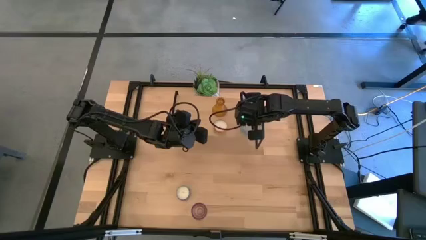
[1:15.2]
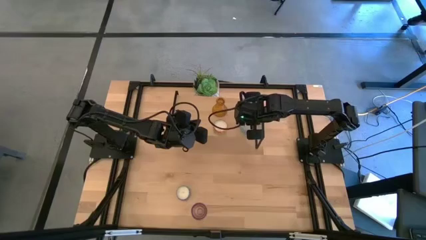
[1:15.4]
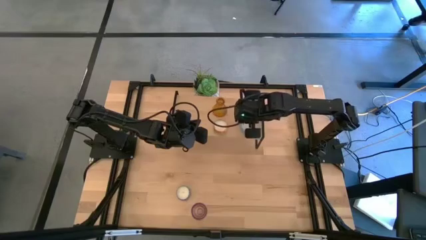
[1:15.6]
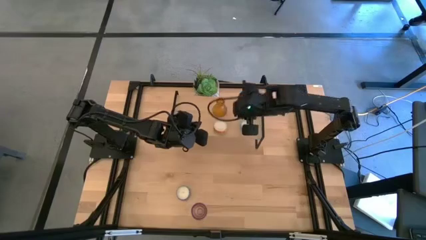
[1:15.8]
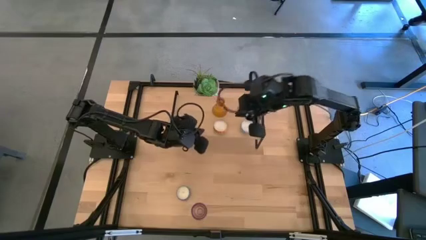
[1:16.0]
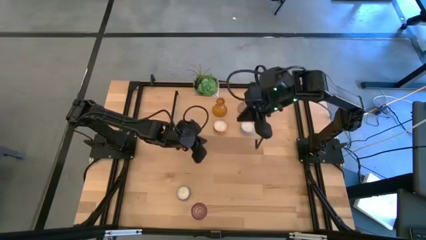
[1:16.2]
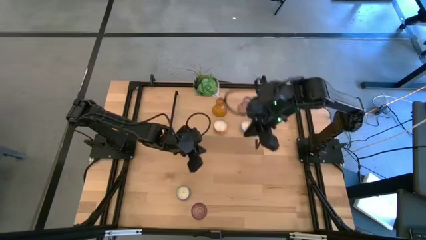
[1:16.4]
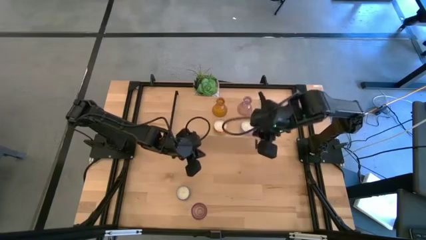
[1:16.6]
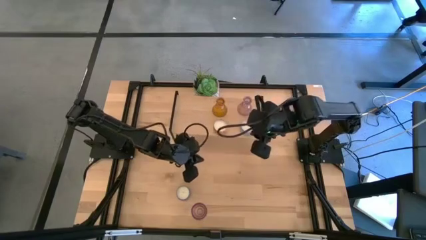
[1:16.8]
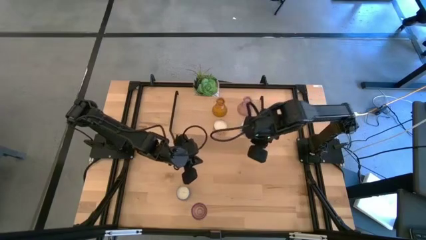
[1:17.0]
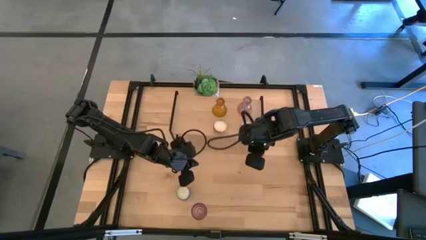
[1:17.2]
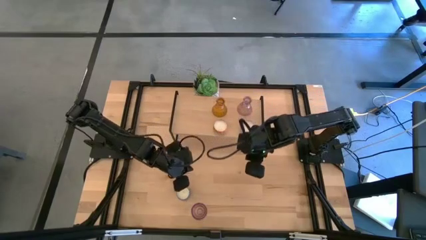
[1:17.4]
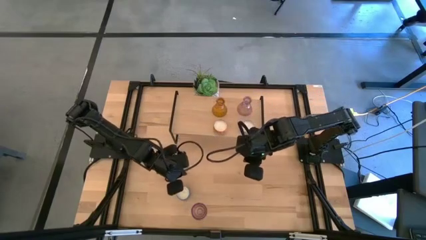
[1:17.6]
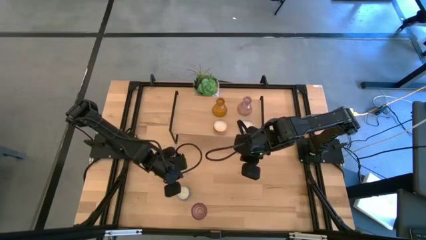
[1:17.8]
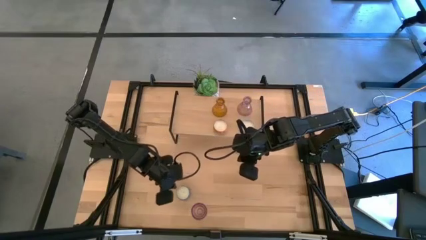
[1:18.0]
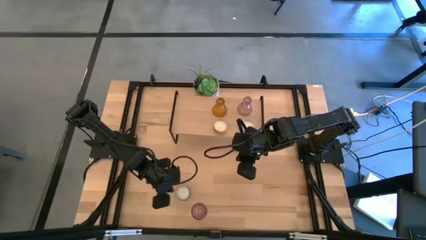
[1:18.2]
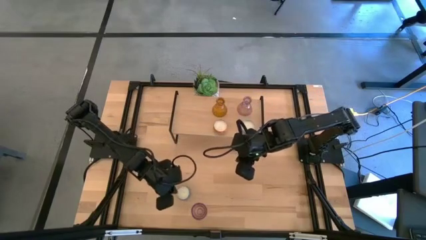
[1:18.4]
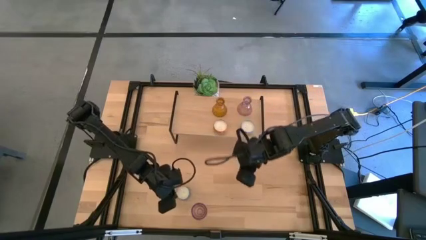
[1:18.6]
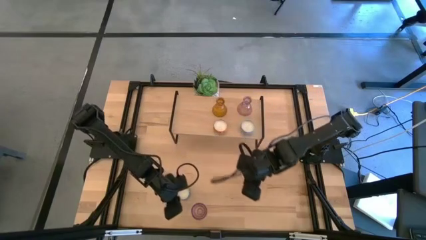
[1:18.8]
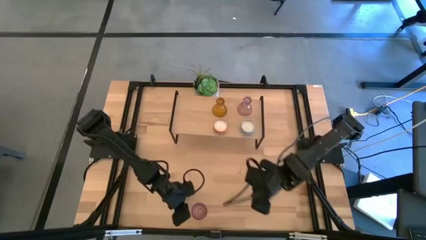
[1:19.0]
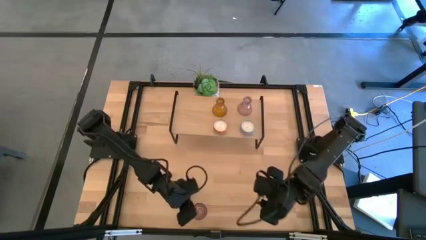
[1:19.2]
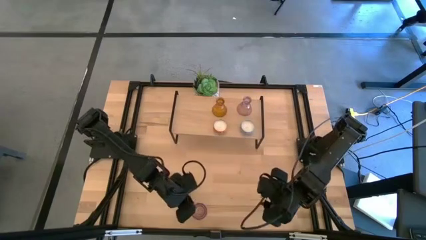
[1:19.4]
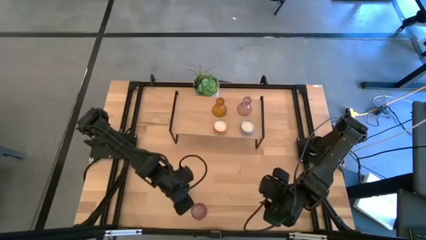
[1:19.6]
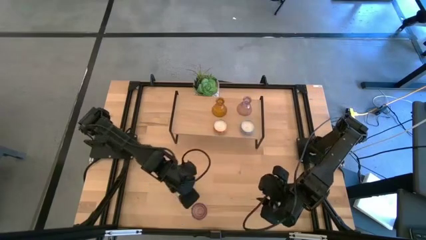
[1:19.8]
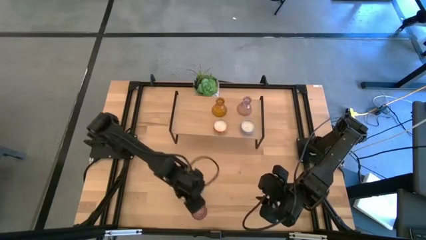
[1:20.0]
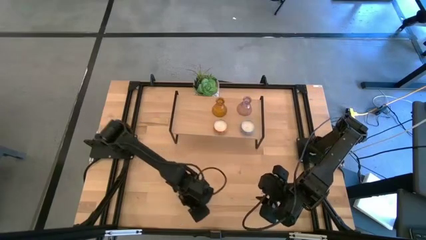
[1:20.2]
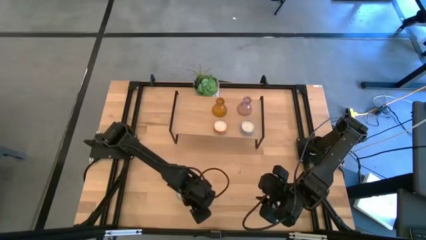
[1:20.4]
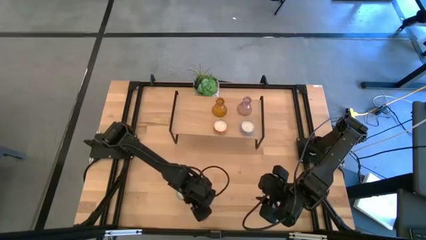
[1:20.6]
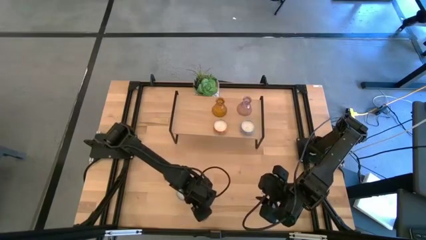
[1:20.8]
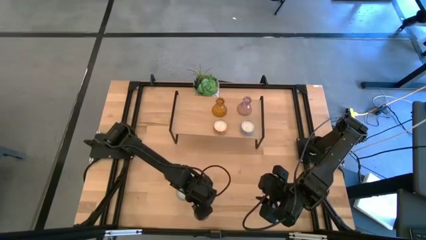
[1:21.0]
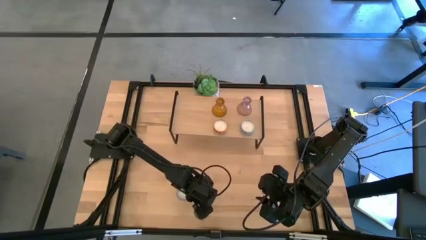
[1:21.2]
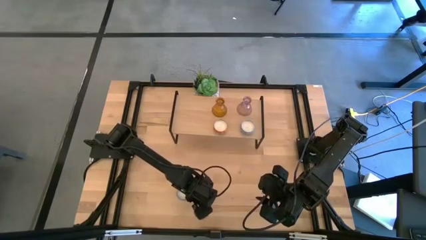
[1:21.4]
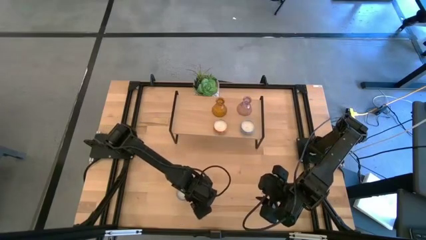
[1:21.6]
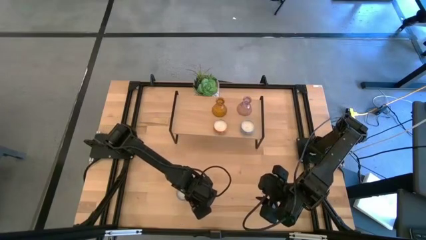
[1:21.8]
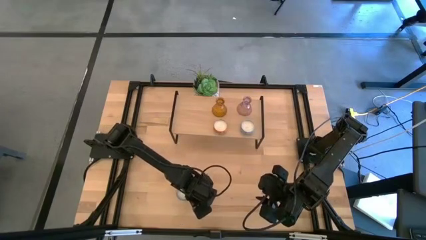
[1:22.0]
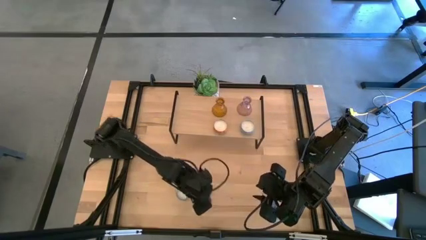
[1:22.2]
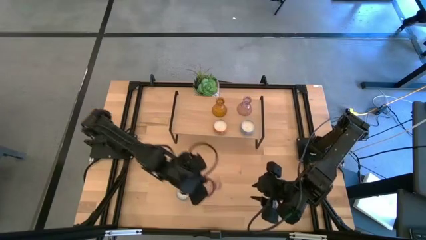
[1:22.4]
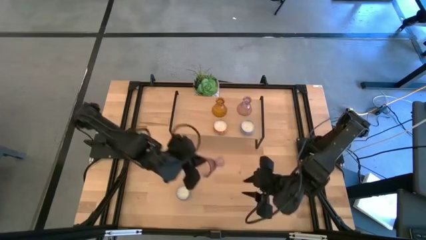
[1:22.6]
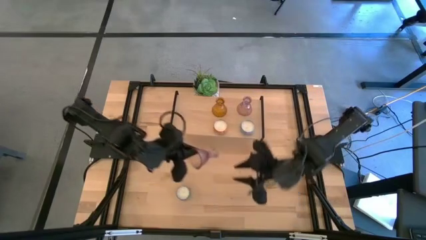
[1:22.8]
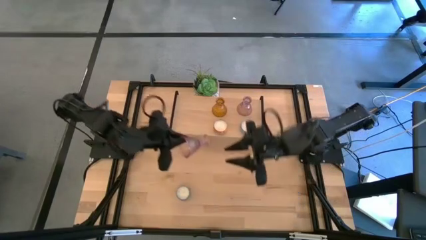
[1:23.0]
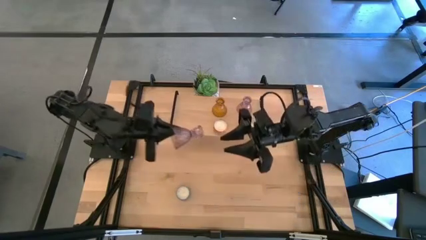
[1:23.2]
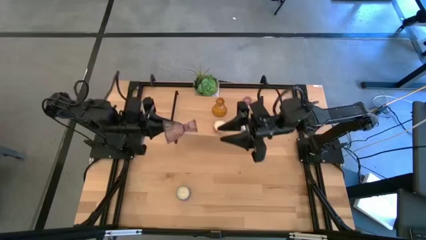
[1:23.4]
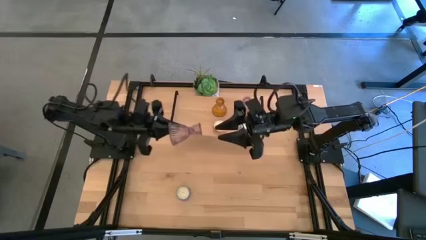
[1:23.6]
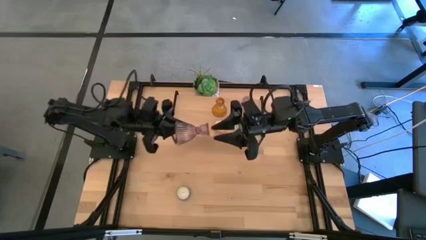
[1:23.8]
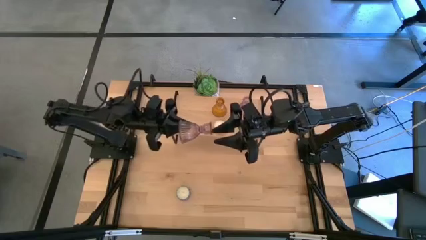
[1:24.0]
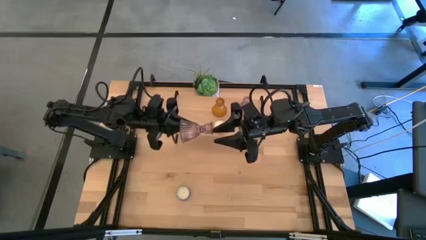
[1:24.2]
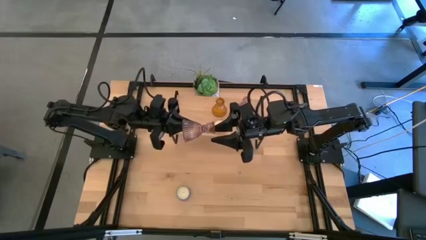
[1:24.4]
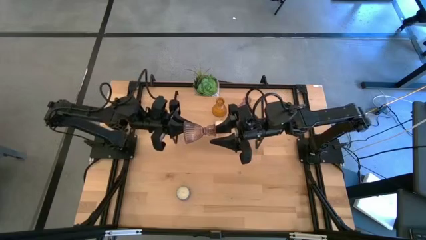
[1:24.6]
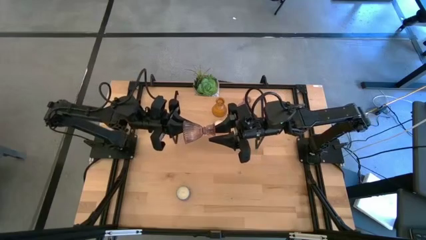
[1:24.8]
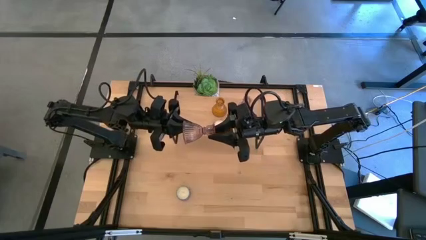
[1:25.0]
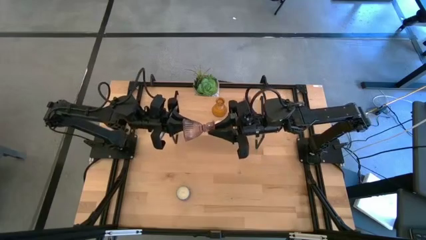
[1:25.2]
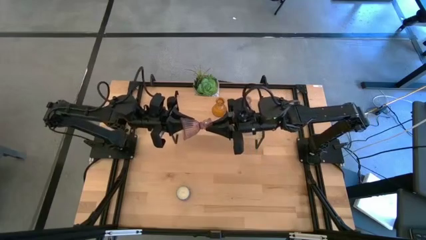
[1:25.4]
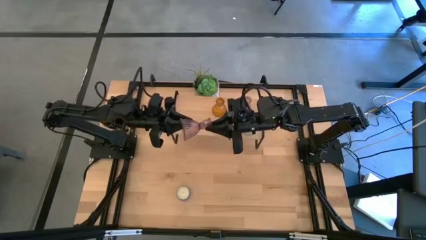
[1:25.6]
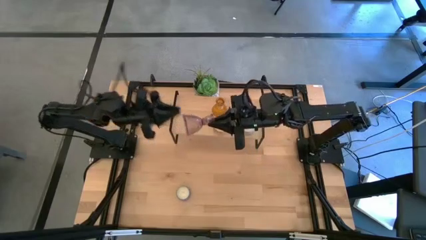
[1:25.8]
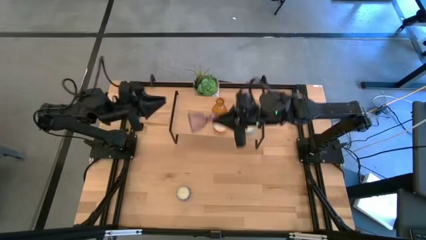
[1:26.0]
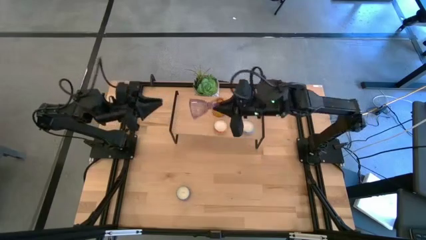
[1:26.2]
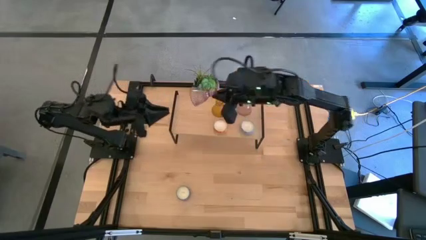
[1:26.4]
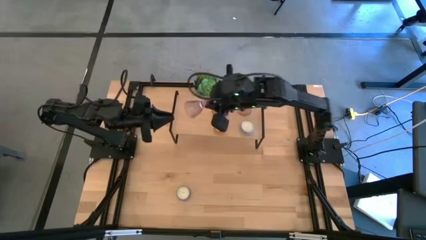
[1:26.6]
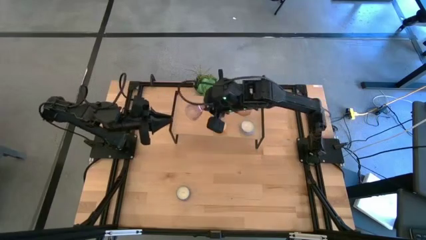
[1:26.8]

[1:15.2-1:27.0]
Task: Pick & Place candle stick holders
Put the violet candle holder on the shelf
